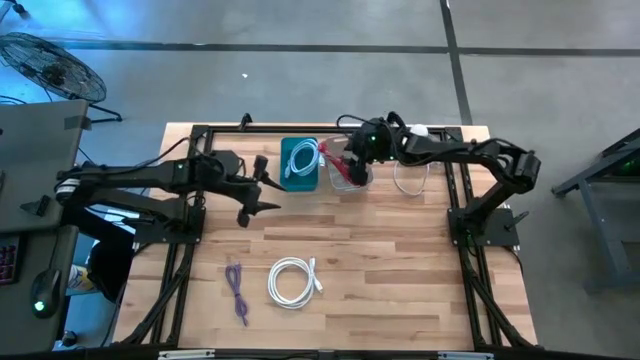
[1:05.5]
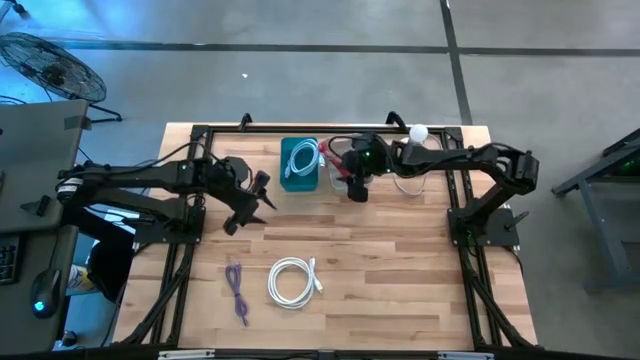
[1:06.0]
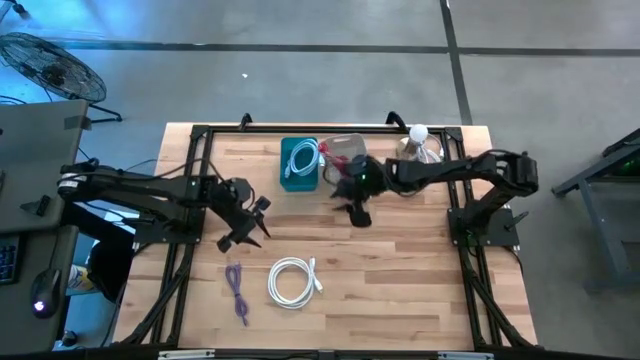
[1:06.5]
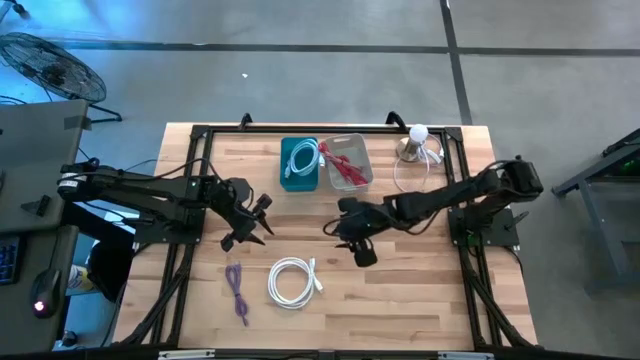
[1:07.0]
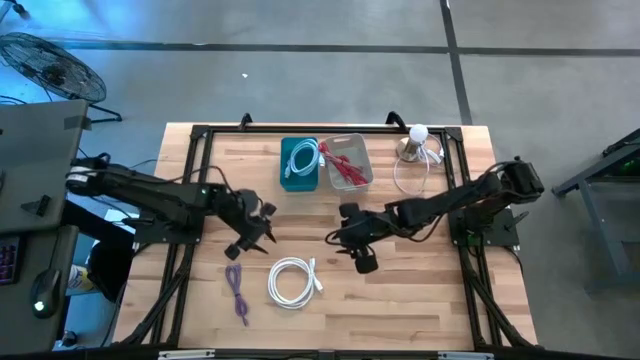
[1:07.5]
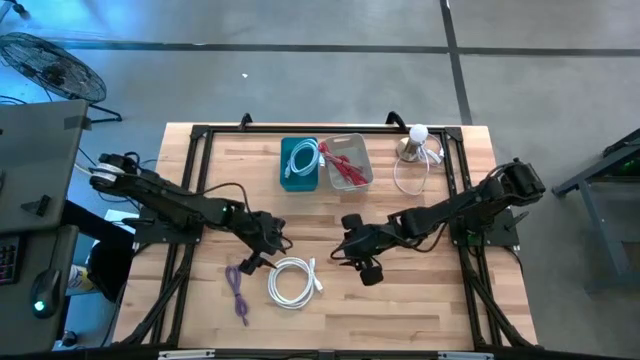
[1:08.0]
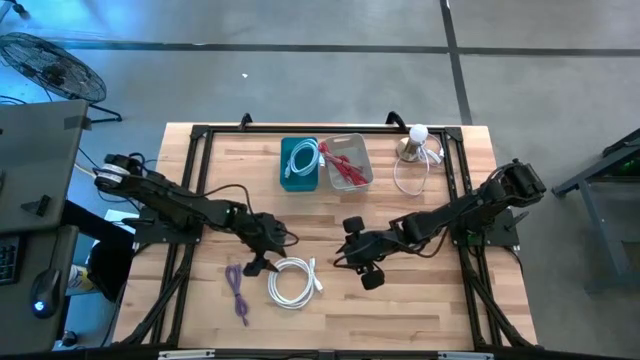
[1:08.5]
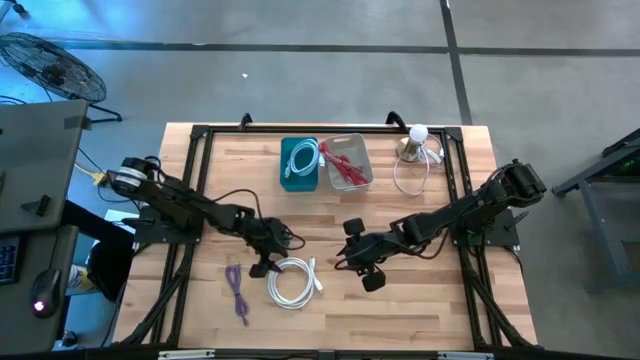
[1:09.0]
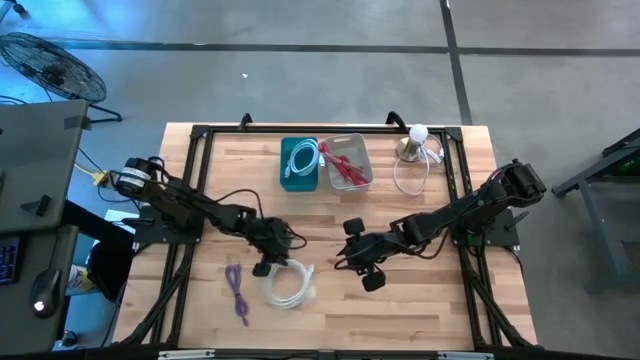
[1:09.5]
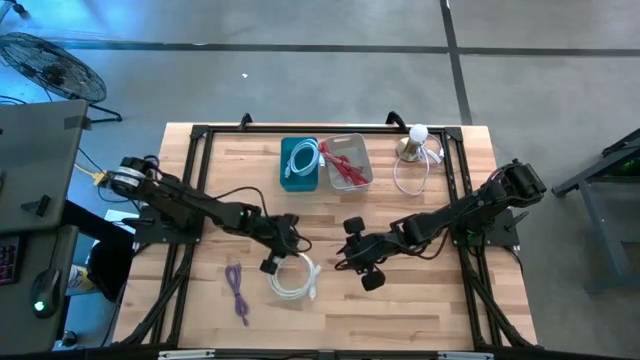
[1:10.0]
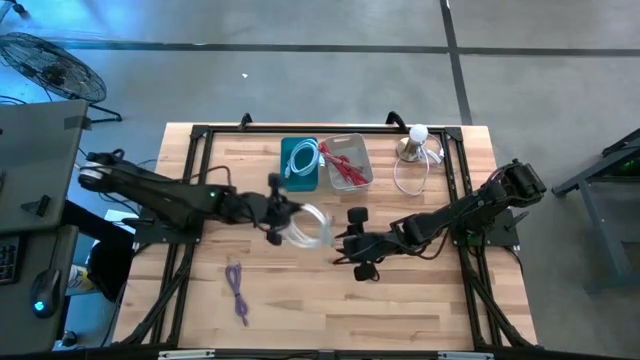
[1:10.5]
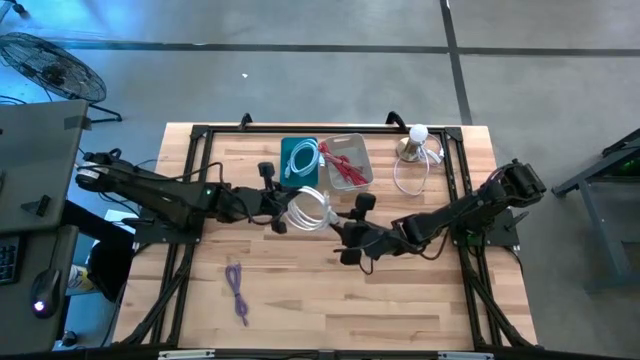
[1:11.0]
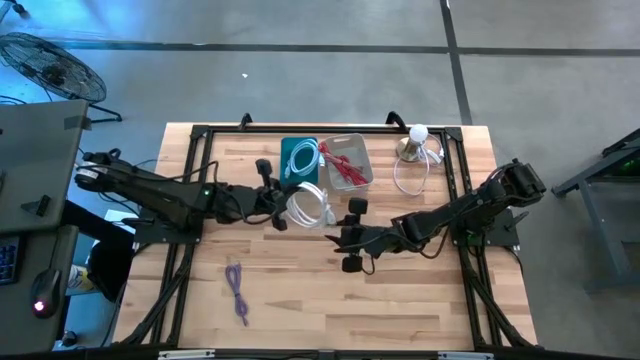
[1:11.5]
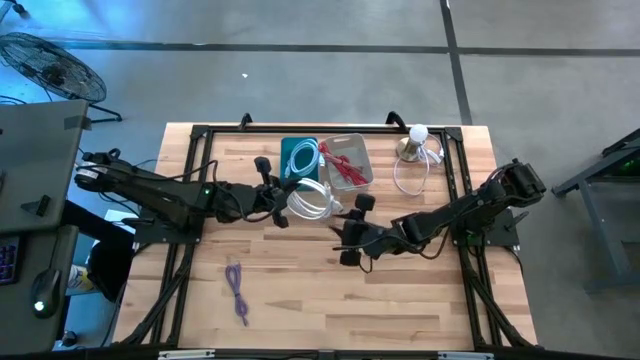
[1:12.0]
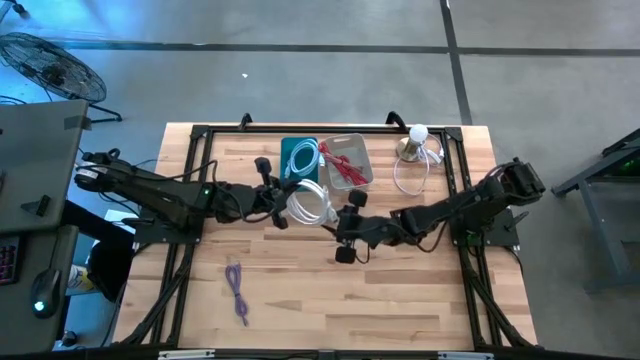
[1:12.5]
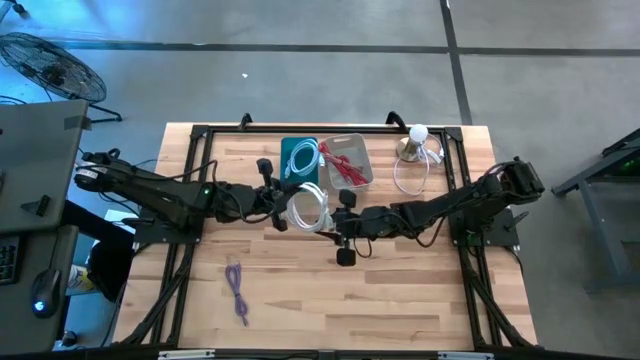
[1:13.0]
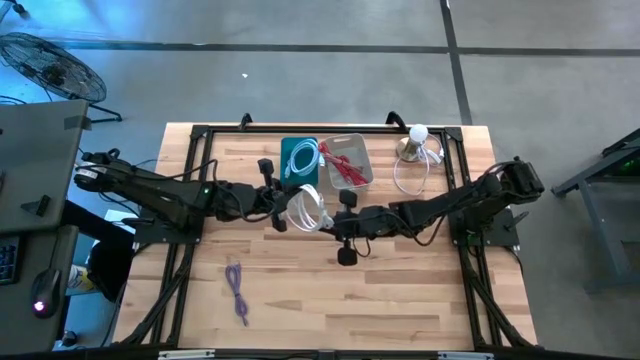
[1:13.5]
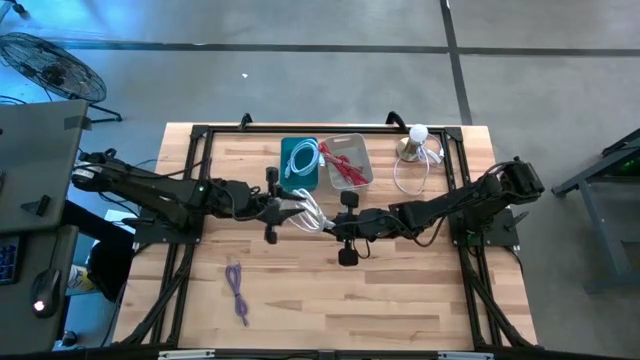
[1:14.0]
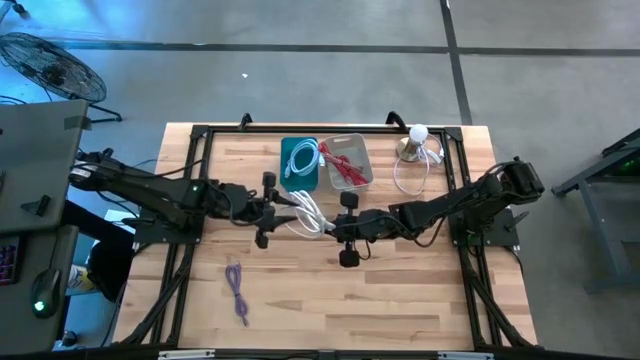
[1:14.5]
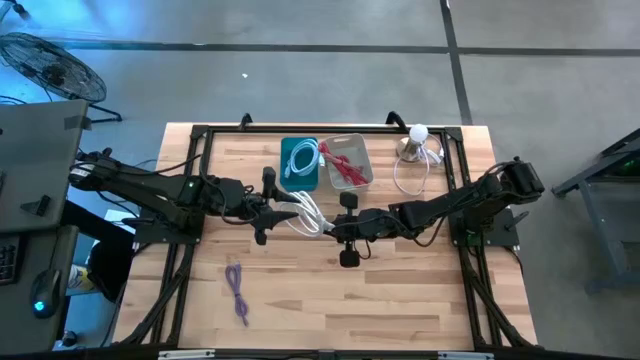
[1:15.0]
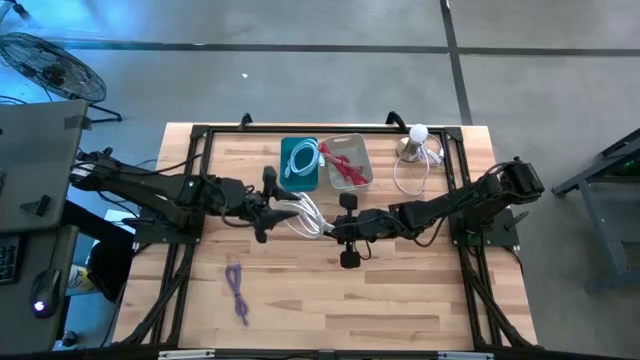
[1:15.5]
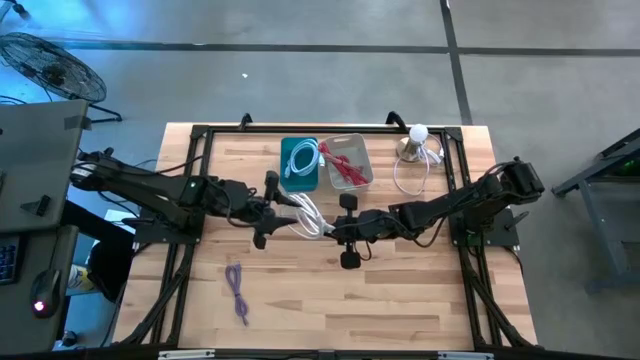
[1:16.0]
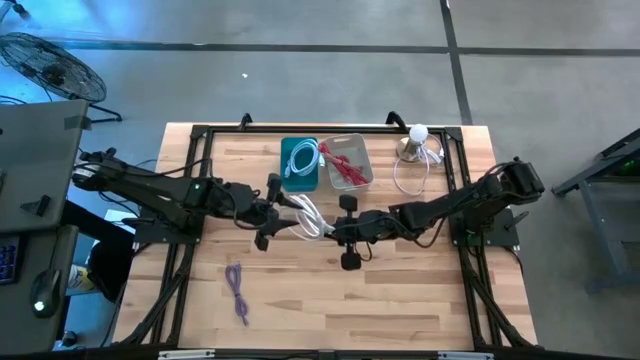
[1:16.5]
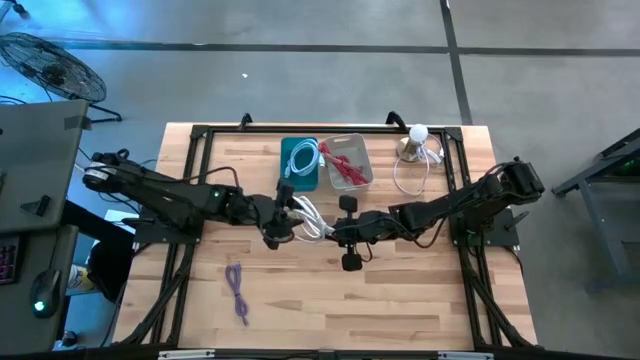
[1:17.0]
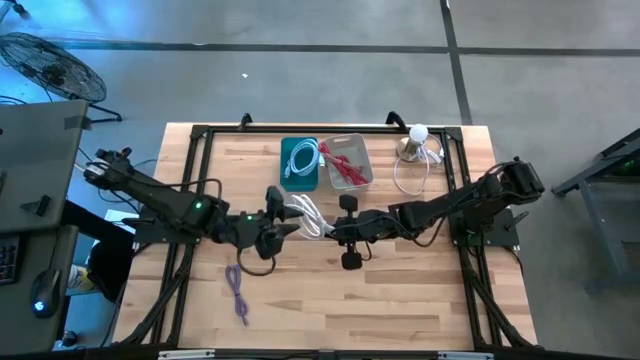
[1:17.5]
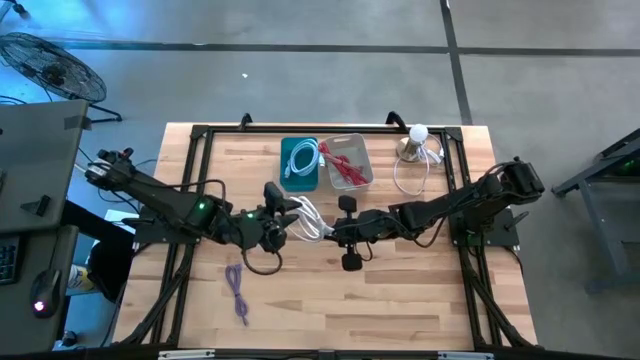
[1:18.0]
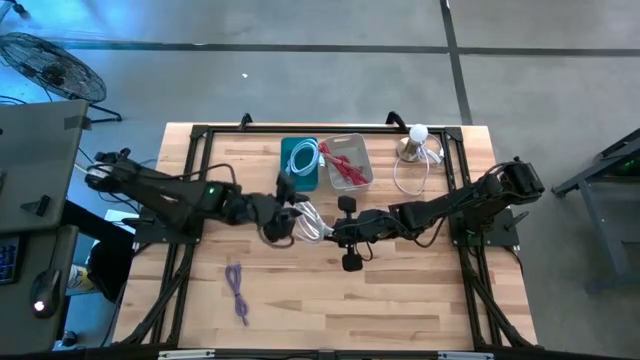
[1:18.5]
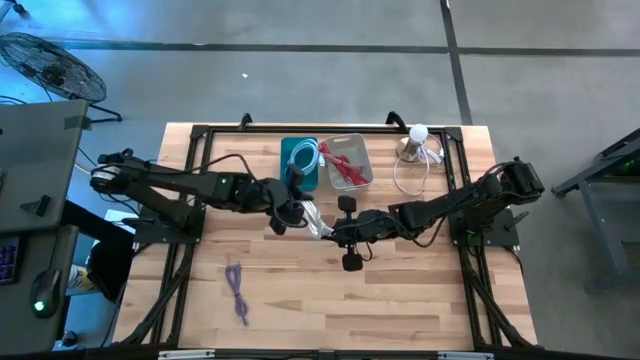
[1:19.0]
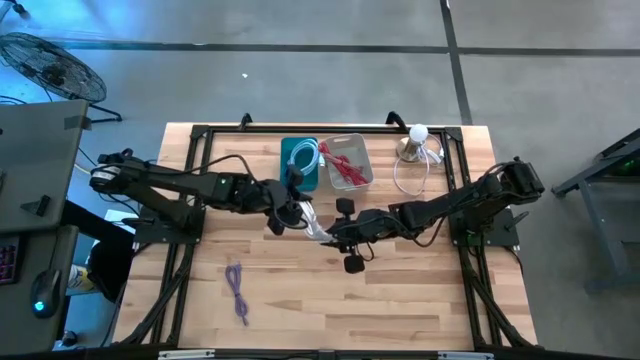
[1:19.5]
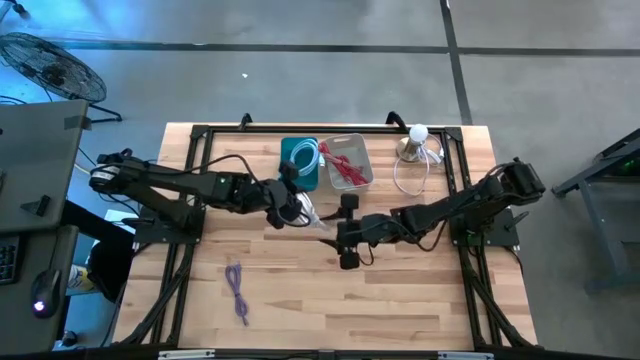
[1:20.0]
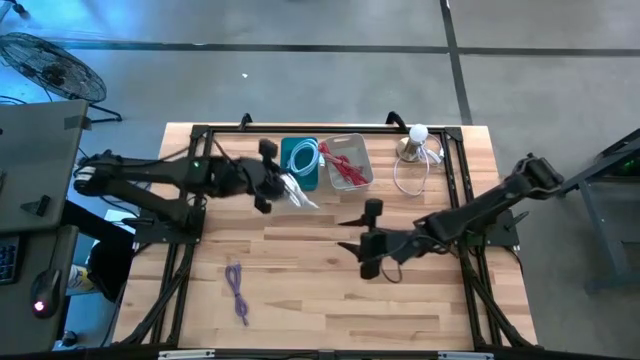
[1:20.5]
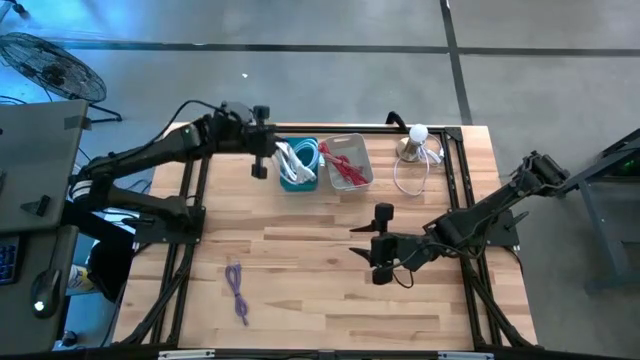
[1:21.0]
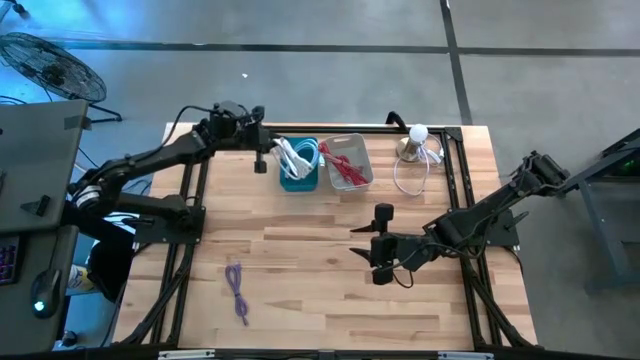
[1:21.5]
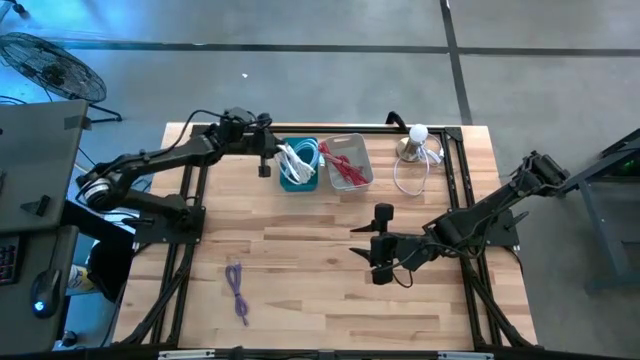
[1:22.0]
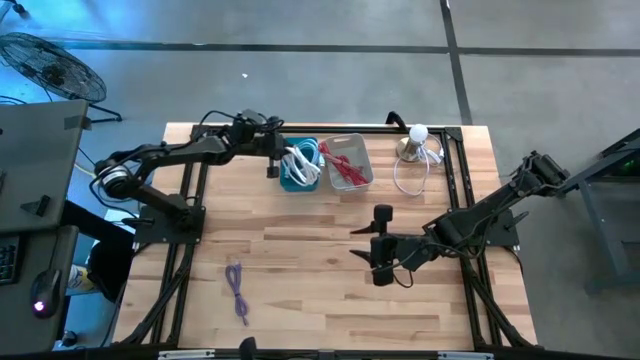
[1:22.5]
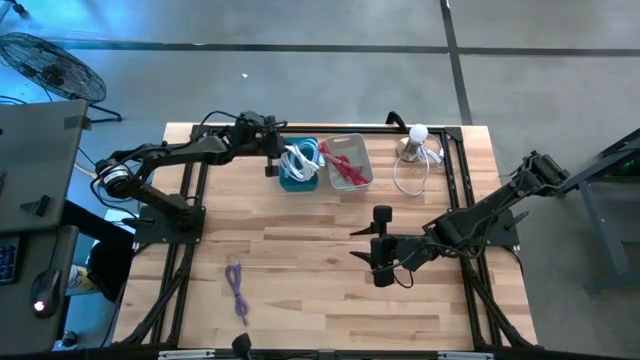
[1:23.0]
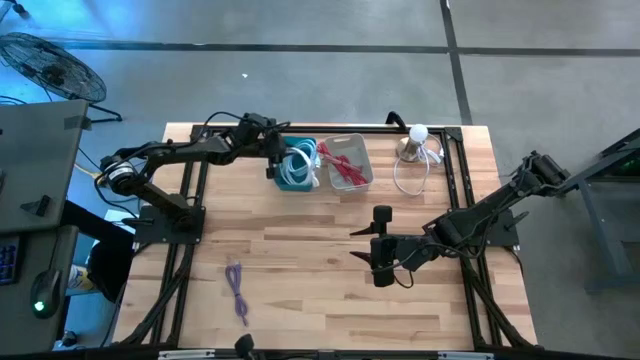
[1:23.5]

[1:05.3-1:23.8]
Task: Pick & Place USB Port
Put the white HDMI cable into the blue bin

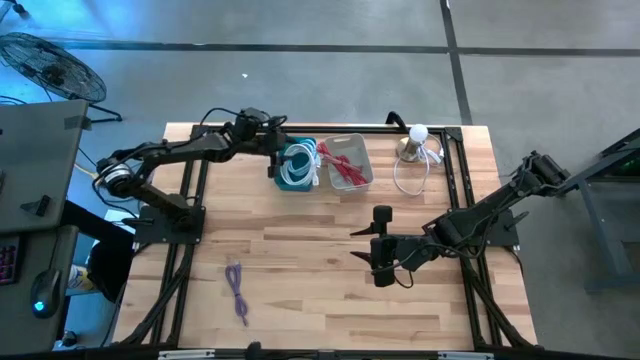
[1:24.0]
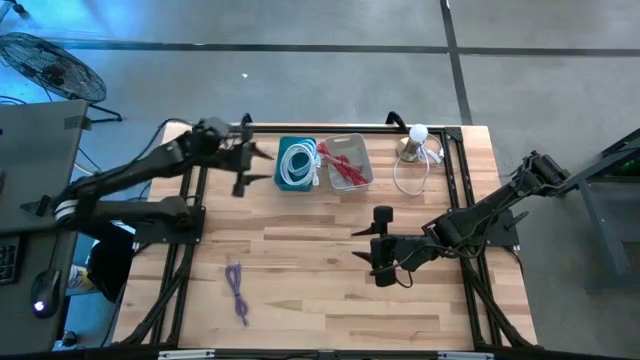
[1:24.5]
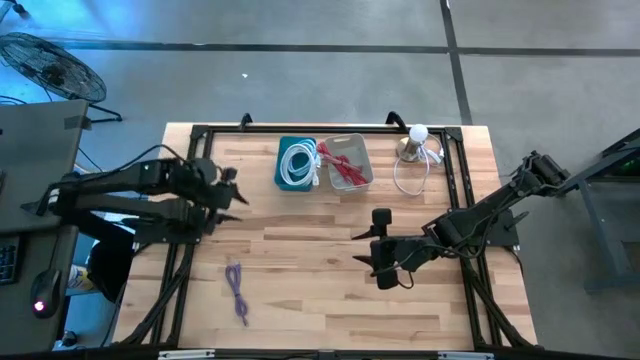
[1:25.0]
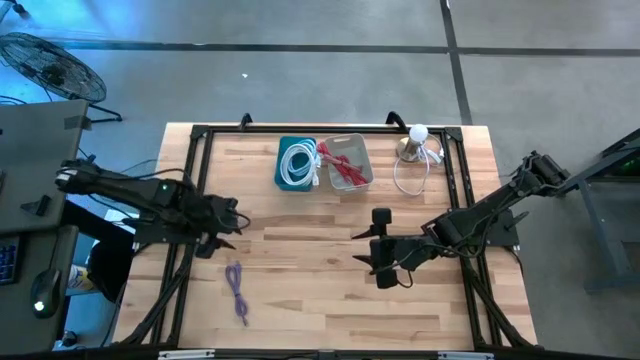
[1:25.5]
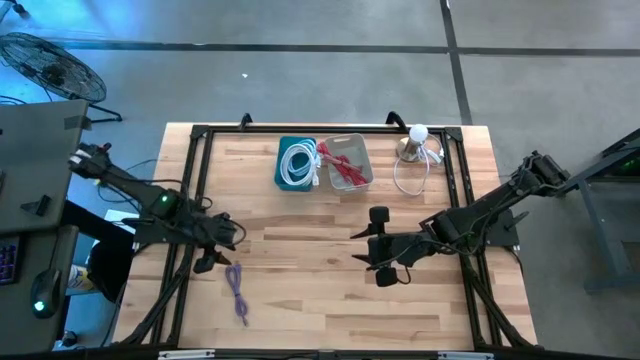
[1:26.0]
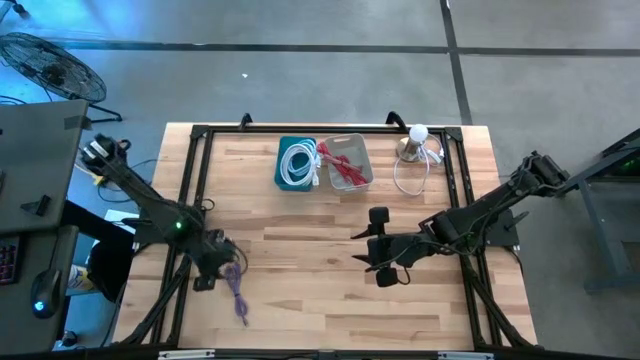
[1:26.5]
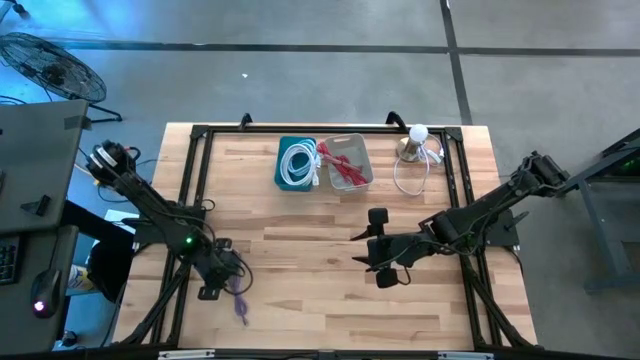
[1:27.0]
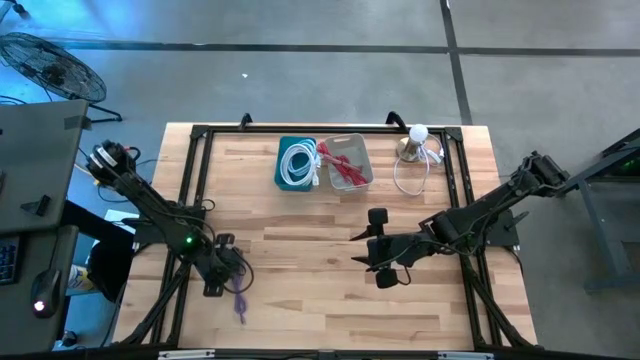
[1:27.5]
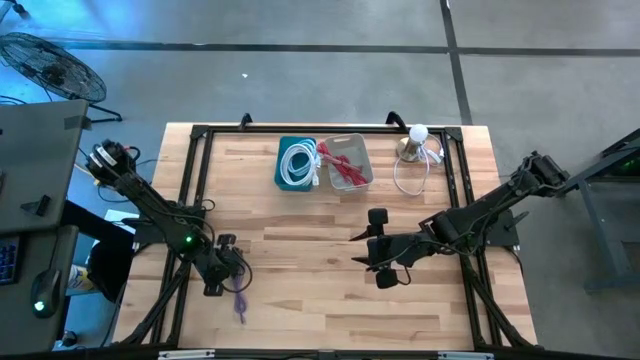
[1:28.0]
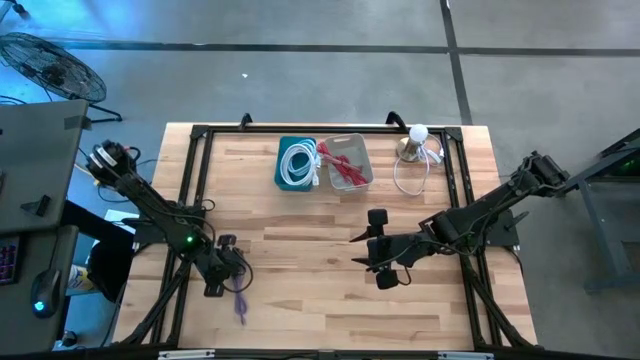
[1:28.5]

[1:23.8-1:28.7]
Put the purple charger cable into the gray bin
